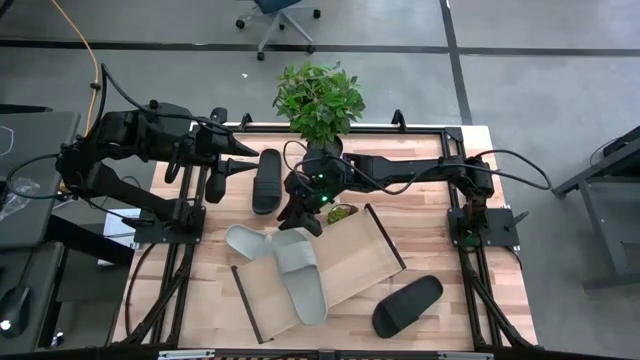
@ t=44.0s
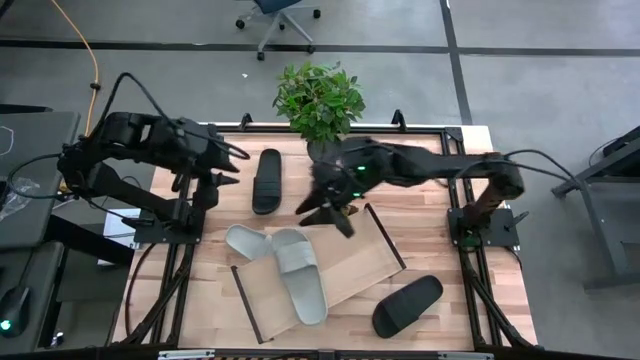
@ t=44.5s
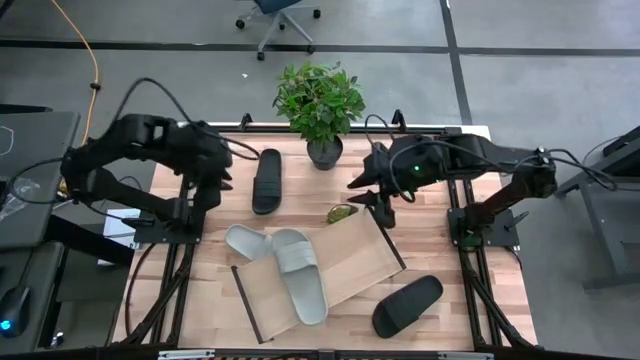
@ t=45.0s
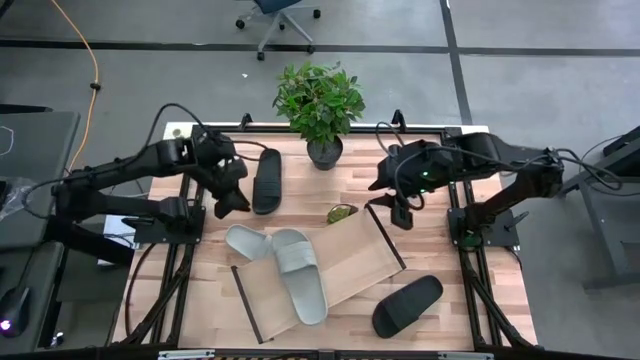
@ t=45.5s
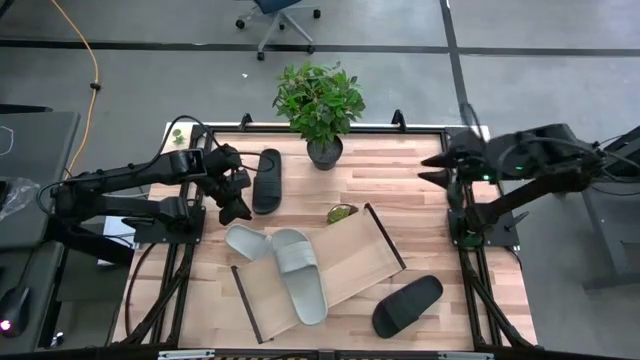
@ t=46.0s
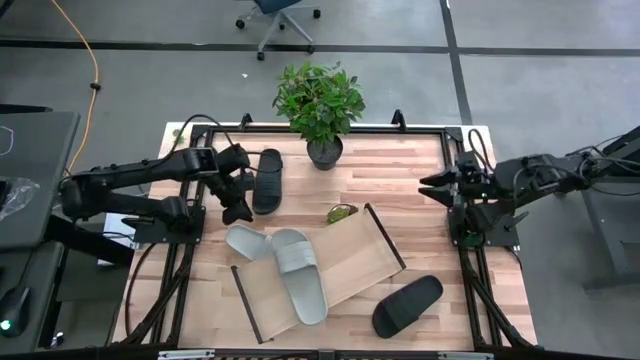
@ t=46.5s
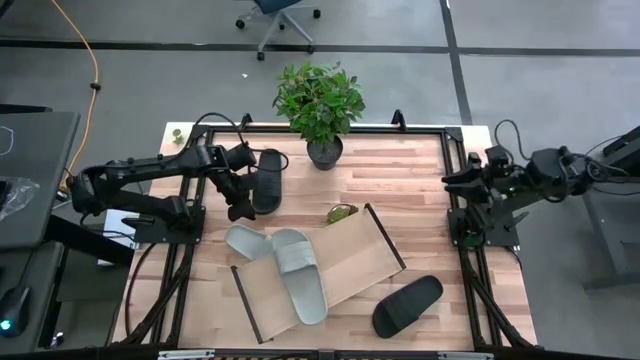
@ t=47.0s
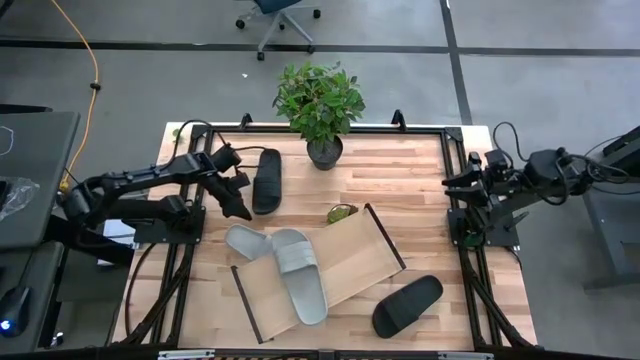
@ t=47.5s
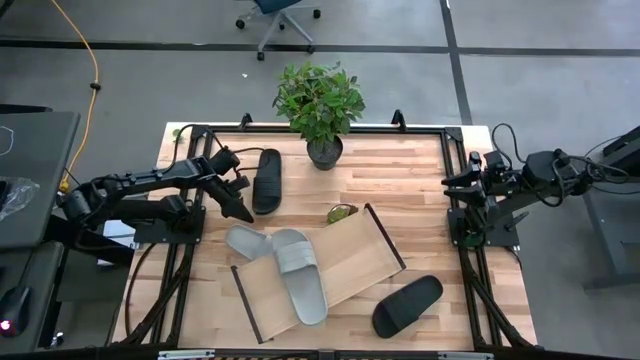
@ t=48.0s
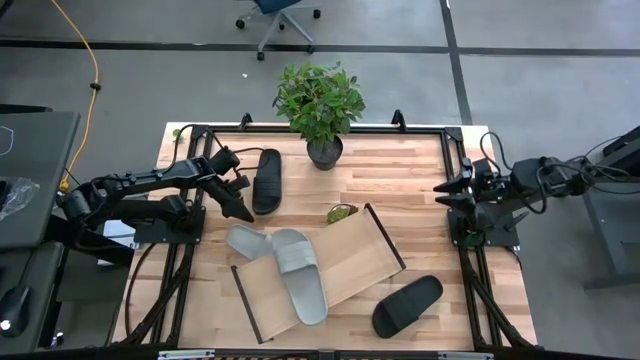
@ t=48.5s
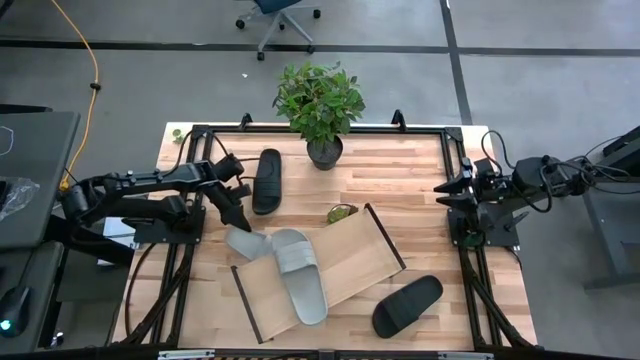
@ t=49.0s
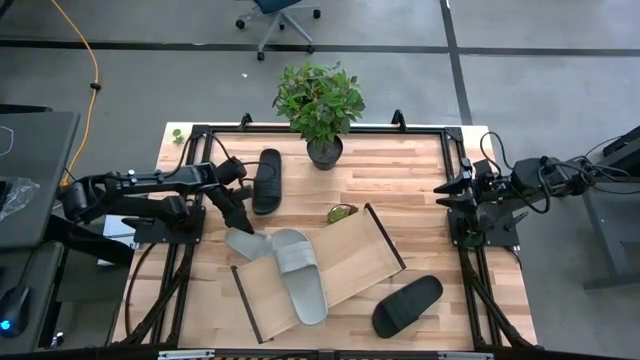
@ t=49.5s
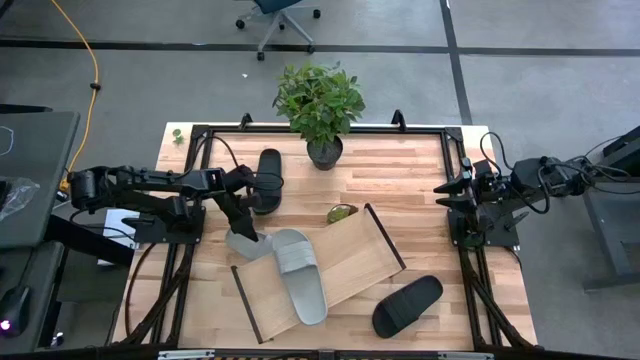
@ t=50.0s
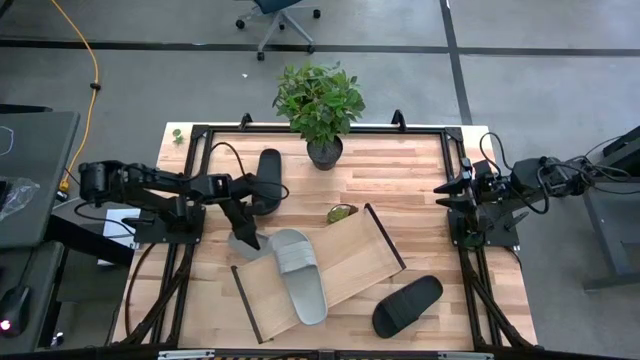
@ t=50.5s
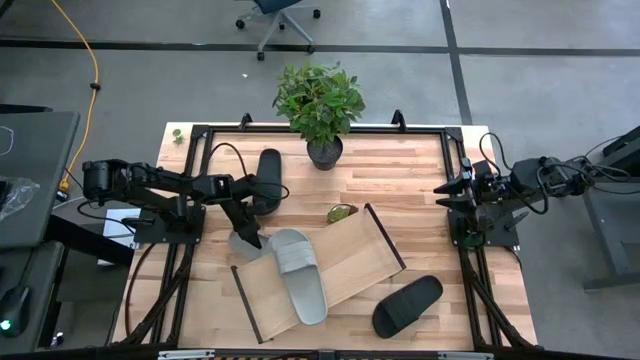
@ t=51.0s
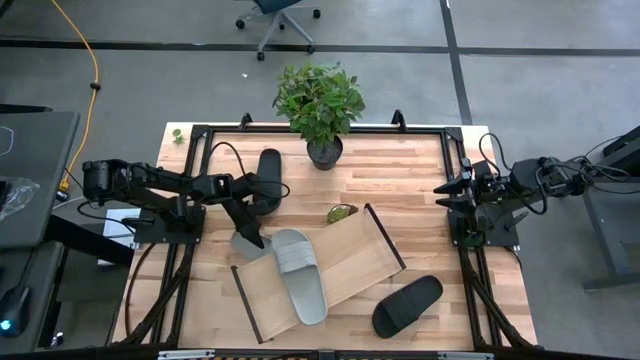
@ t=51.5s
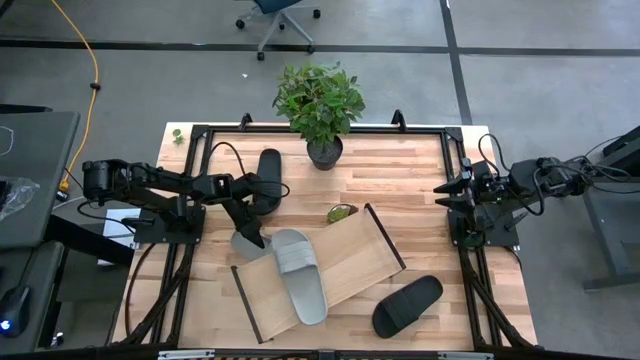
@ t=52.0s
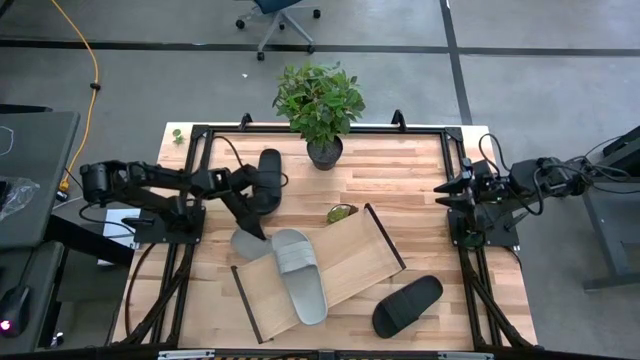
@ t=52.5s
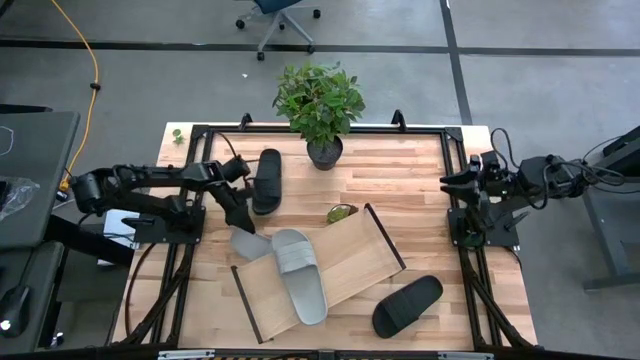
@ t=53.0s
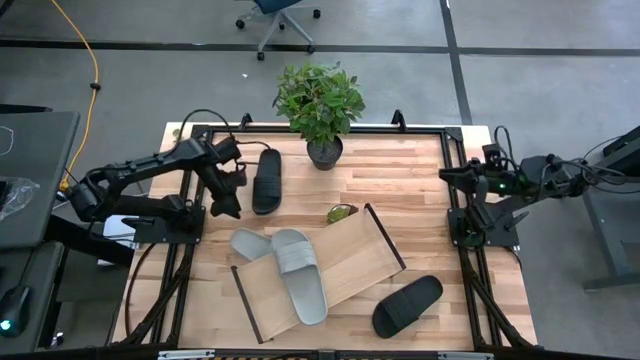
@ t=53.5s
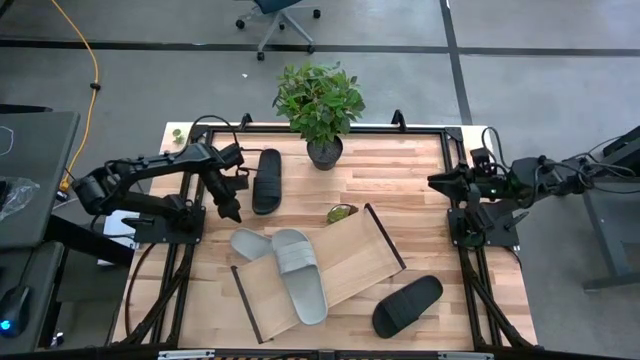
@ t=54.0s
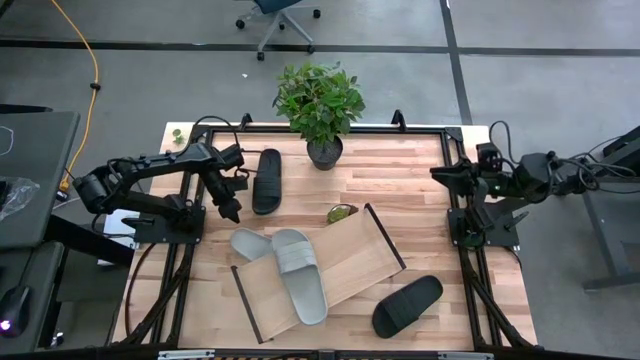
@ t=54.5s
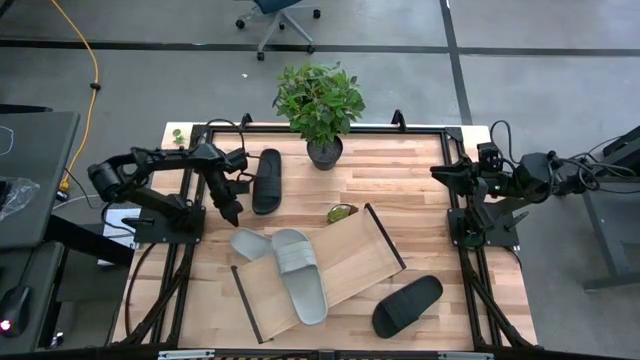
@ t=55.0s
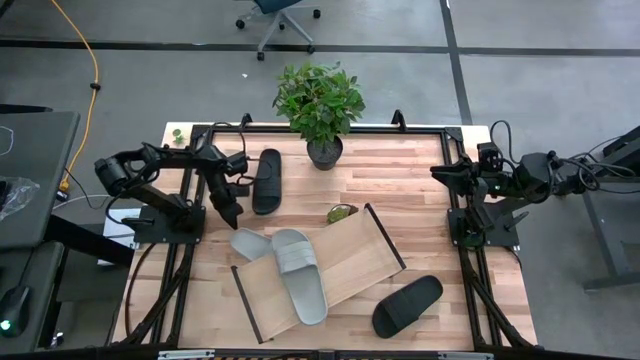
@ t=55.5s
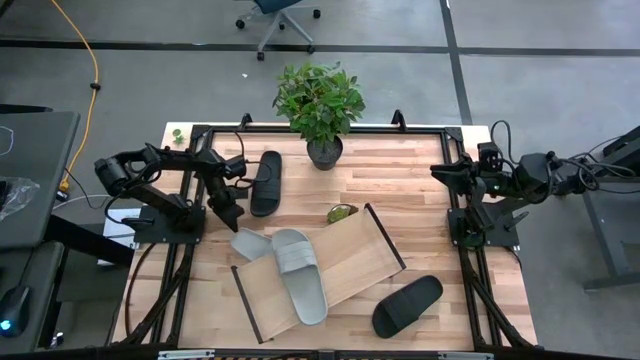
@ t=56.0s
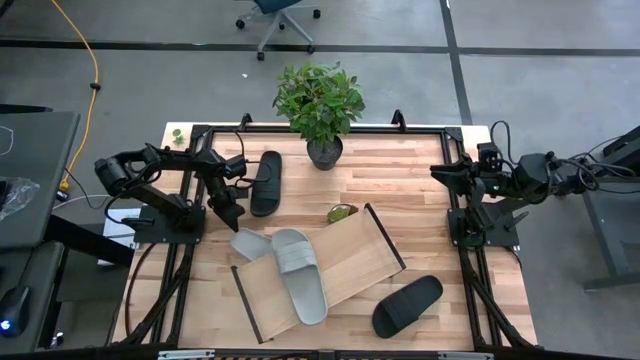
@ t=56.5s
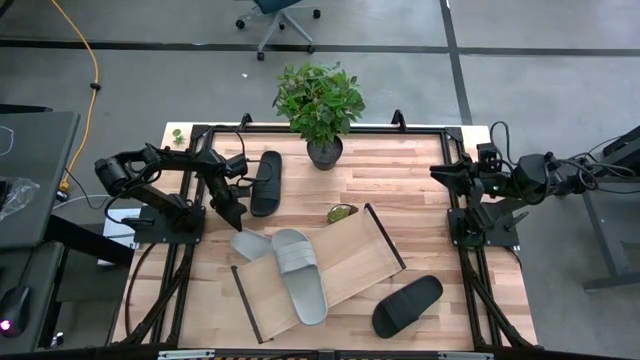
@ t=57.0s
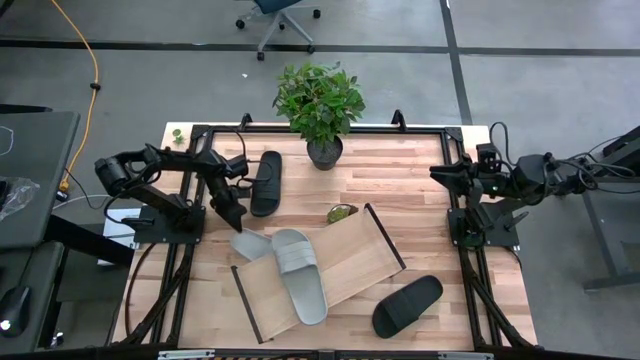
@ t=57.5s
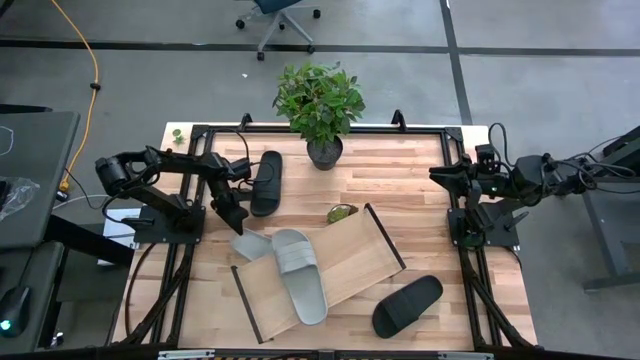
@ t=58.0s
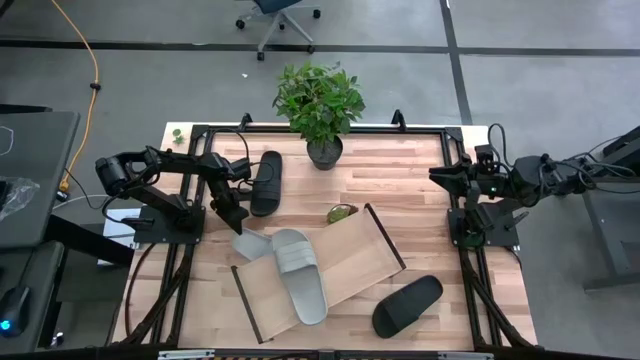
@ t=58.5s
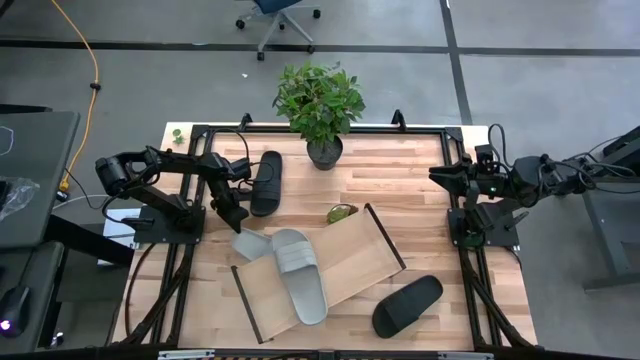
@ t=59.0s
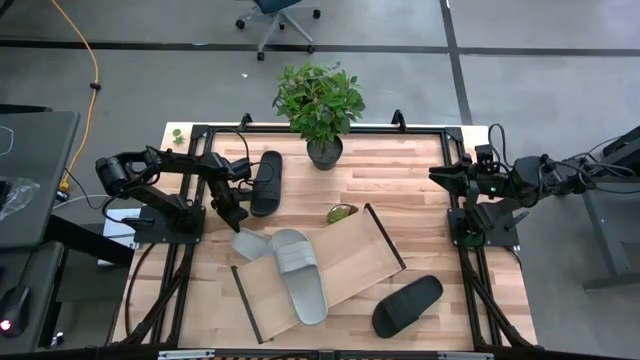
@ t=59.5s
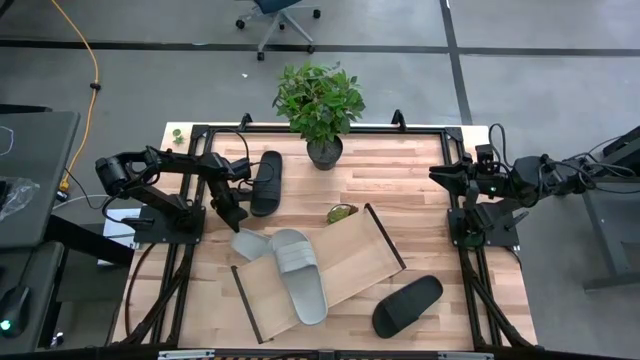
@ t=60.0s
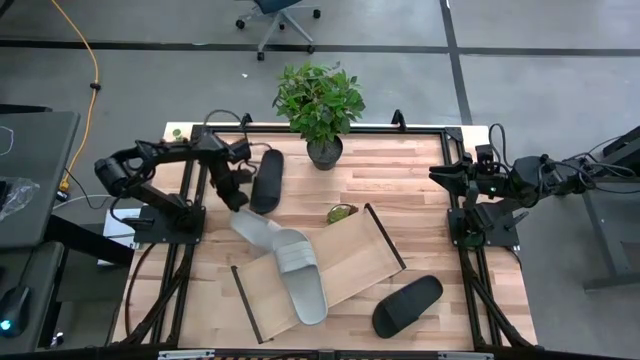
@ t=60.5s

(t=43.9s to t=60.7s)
Task: Pick and place slides into the shelf
Put the gray slipper on the shelf

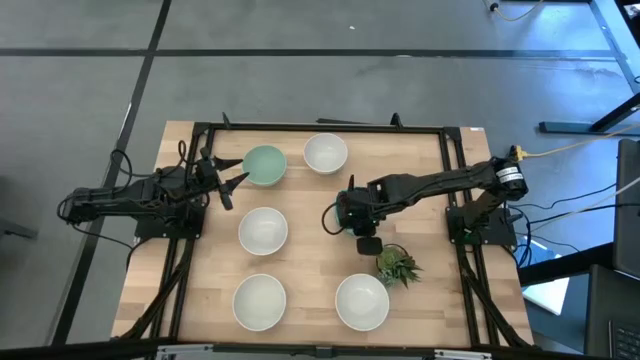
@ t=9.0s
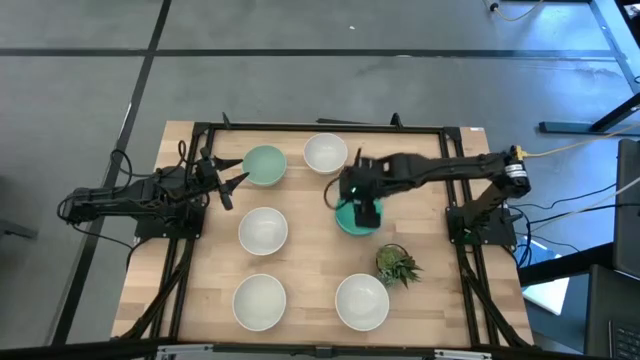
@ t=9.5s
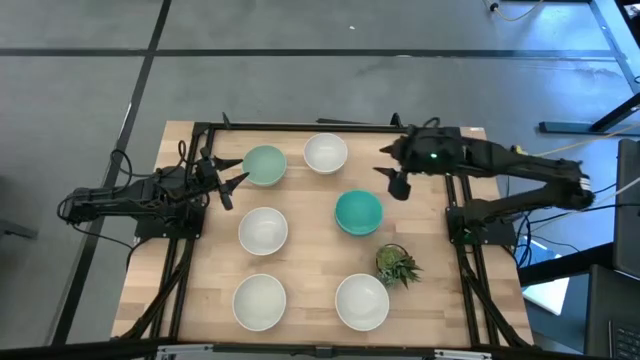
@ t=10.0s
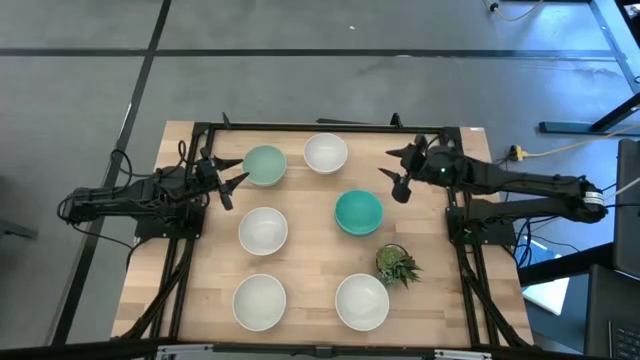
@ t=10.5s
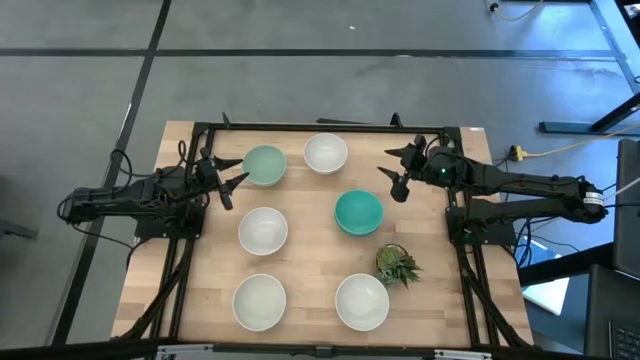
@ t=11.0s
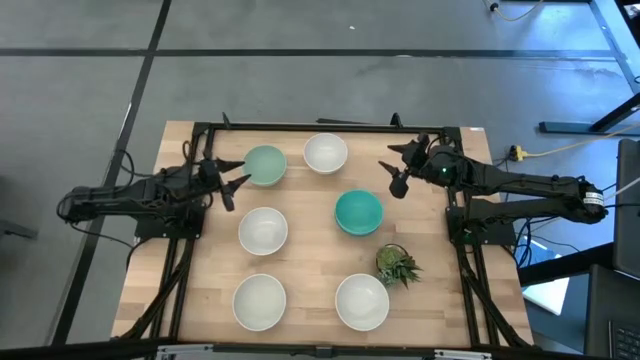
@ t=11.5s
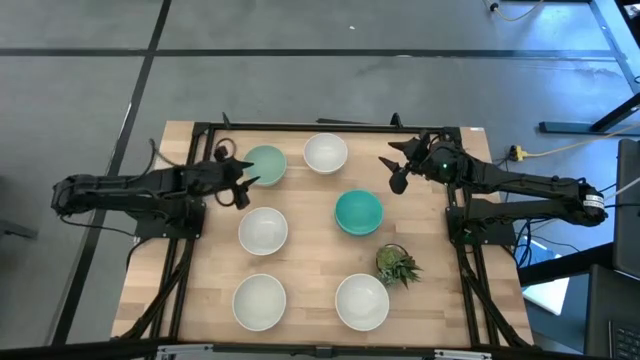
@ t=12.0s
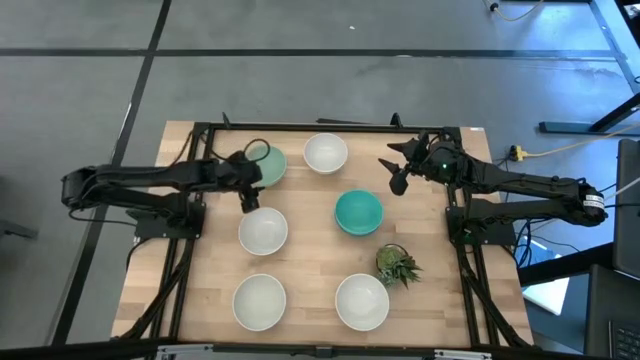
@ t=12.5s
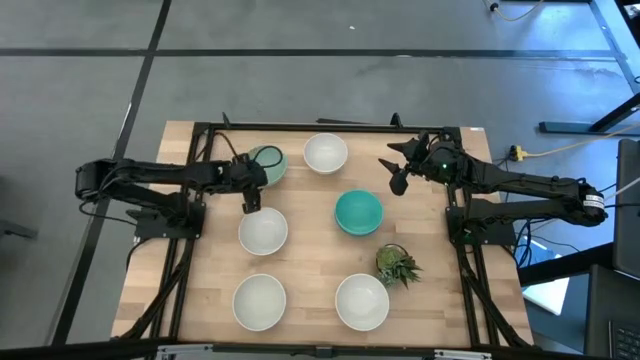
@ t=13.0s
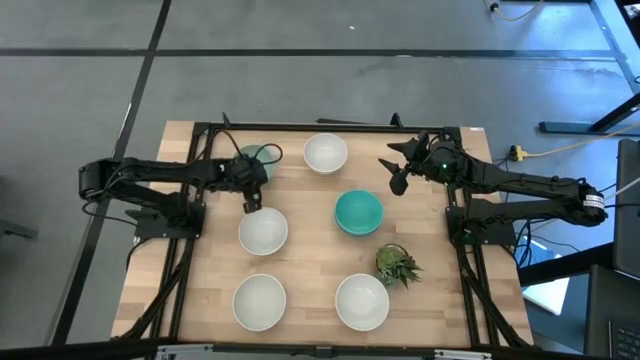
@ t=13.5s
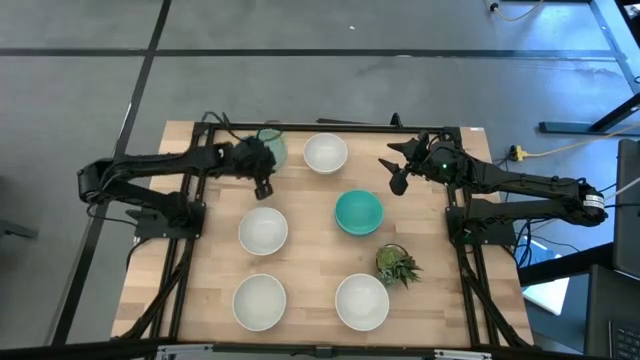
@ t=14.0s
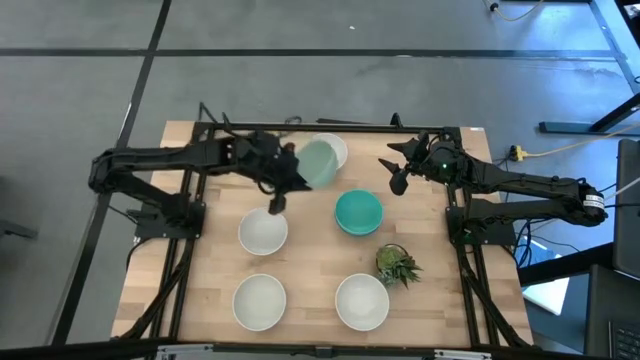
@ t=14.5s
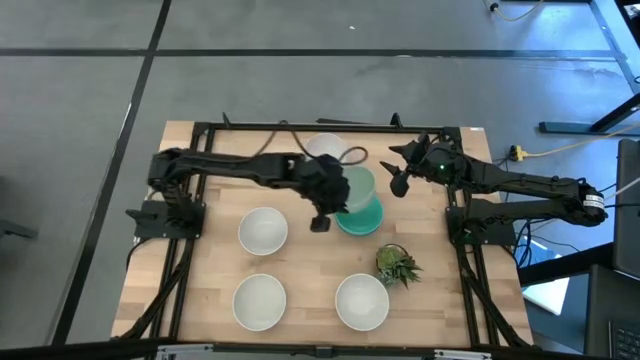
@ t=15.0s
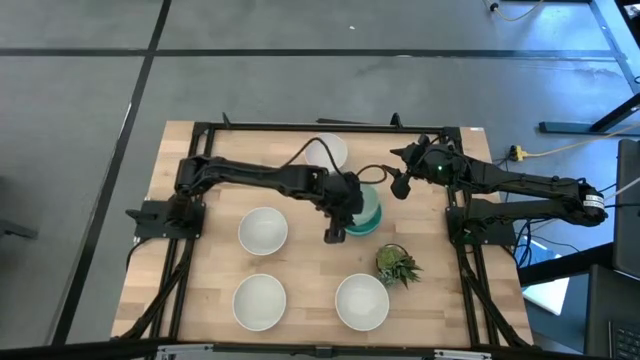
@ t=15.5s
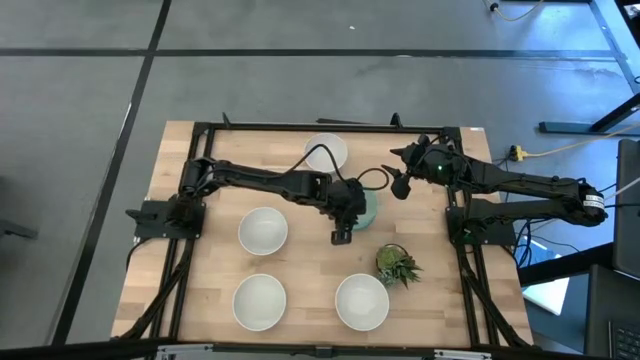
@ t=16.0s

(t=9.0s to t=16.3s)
Task: Nest bowls inside each other
Stack the light green bowl on the blue bowl
